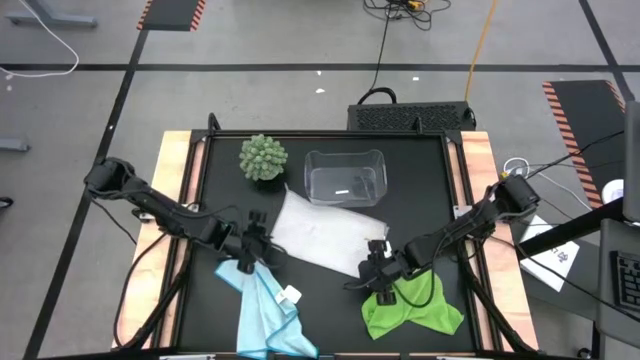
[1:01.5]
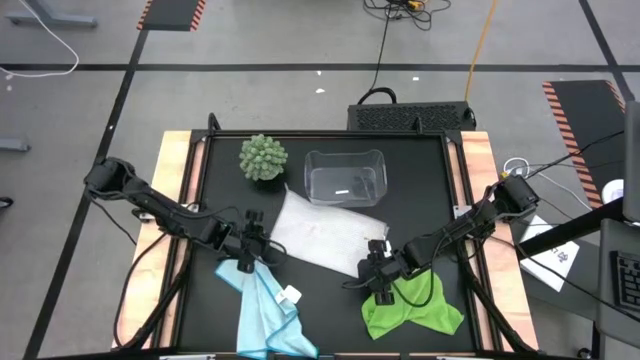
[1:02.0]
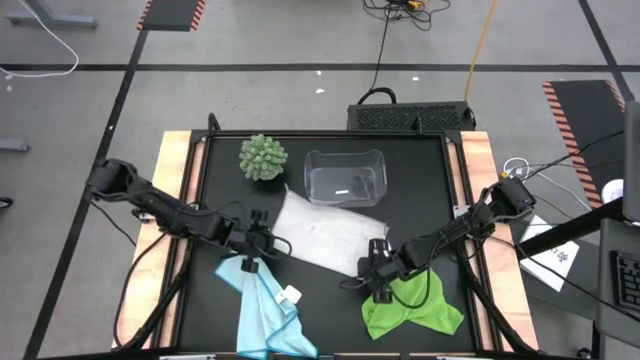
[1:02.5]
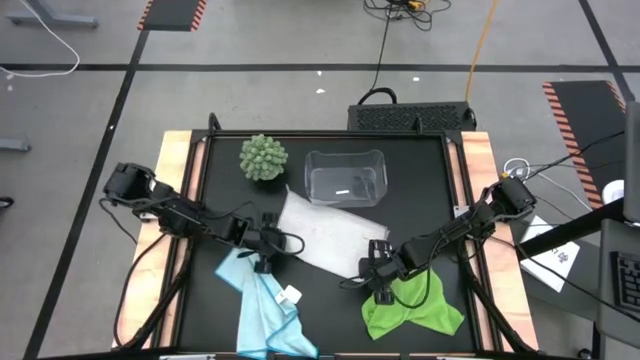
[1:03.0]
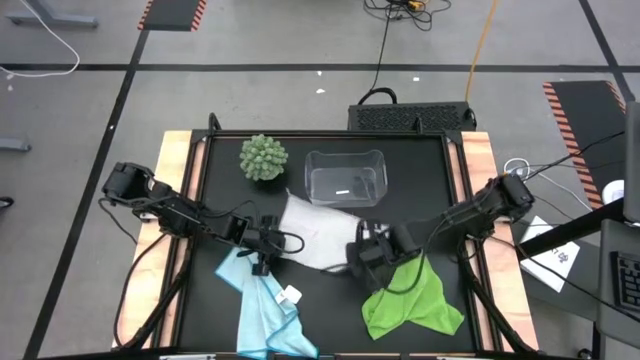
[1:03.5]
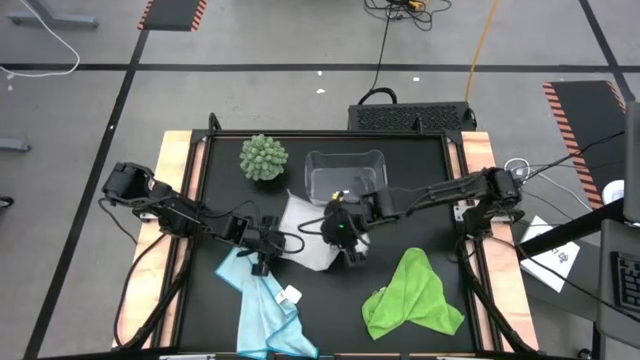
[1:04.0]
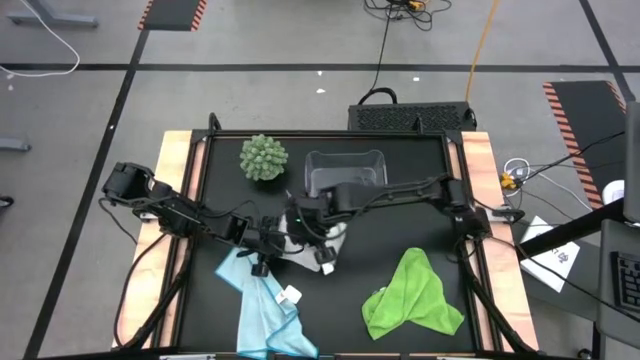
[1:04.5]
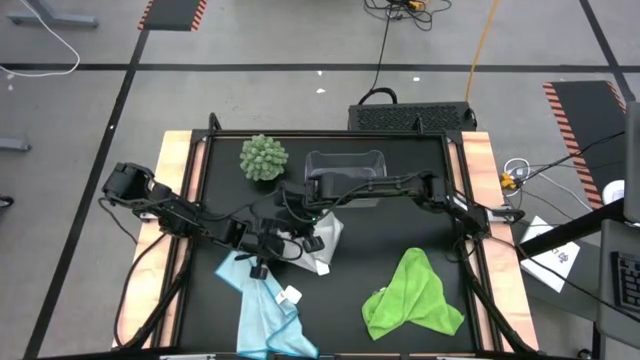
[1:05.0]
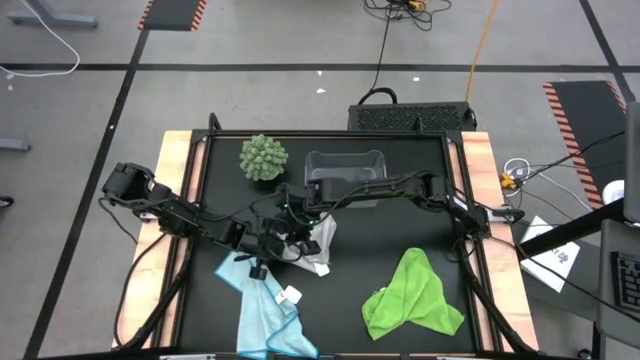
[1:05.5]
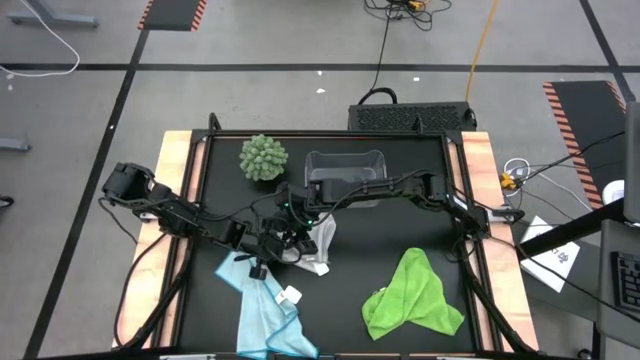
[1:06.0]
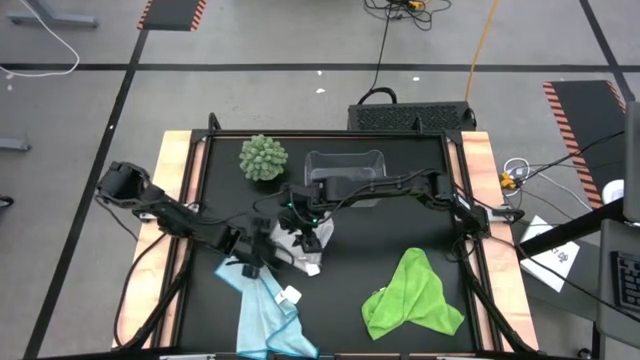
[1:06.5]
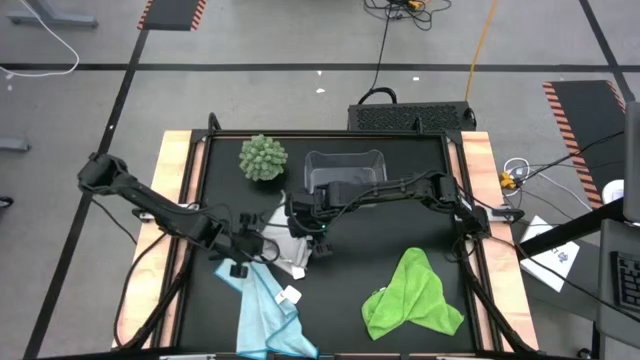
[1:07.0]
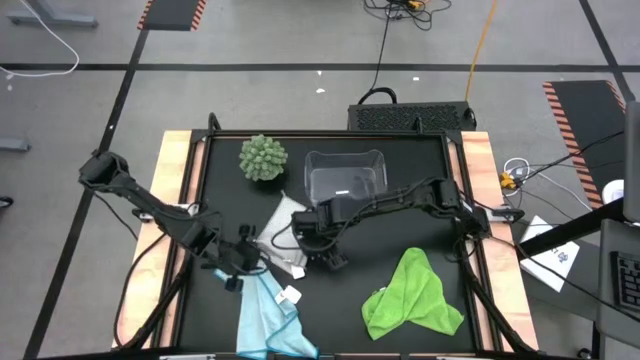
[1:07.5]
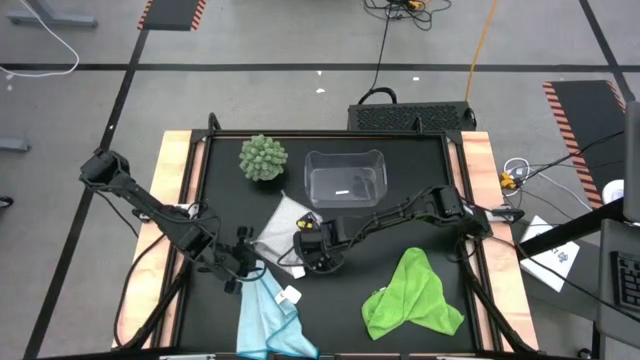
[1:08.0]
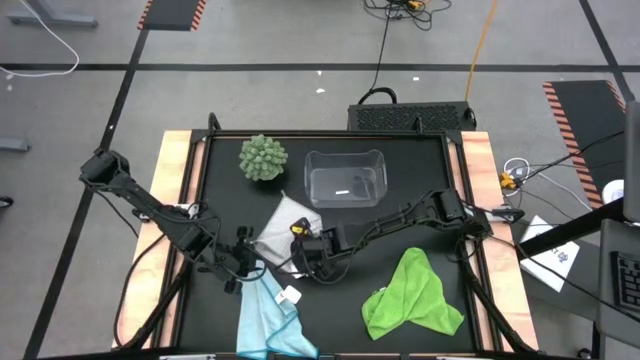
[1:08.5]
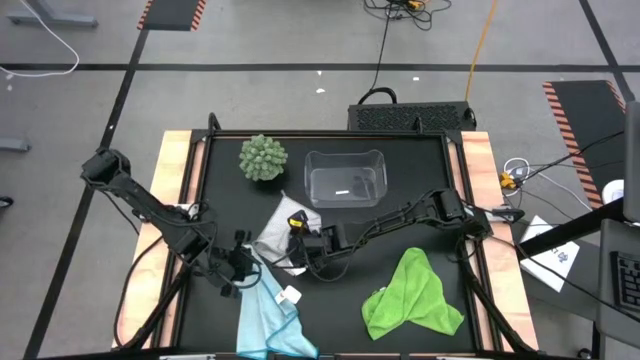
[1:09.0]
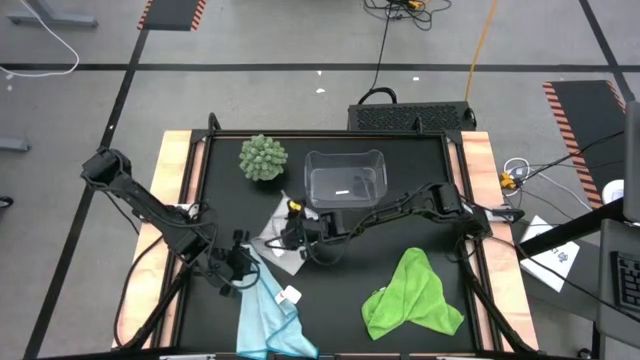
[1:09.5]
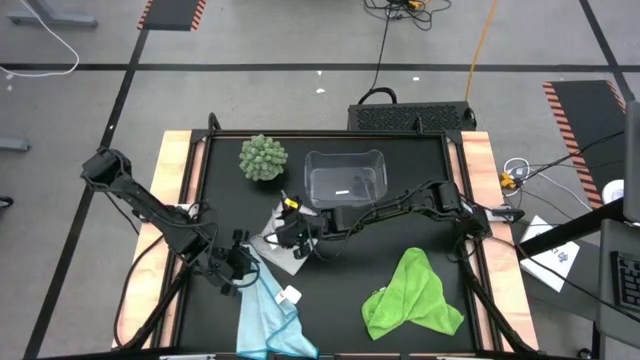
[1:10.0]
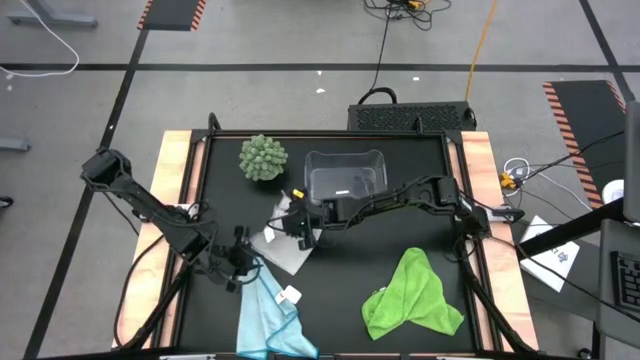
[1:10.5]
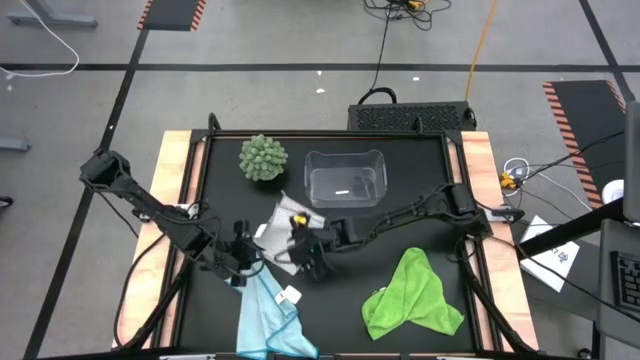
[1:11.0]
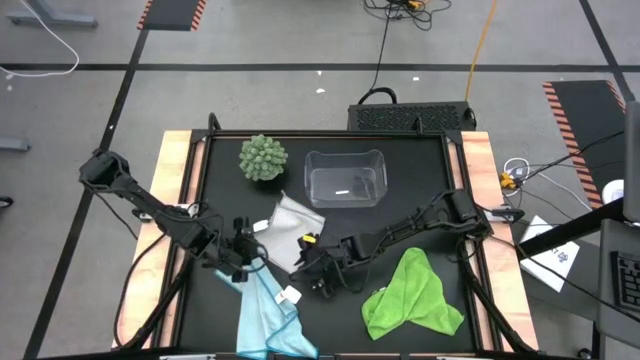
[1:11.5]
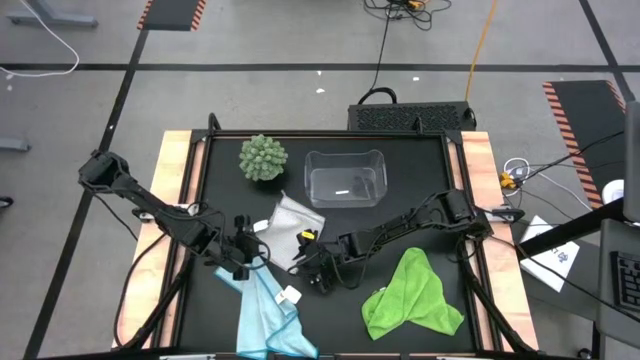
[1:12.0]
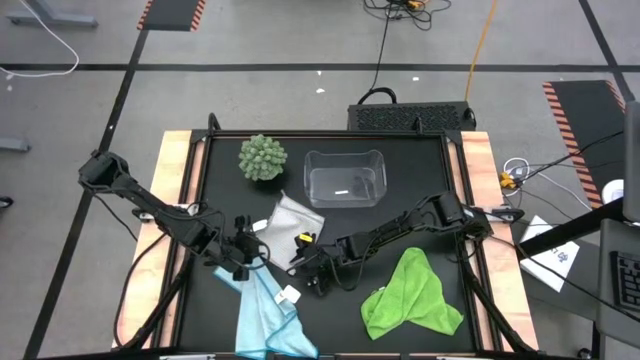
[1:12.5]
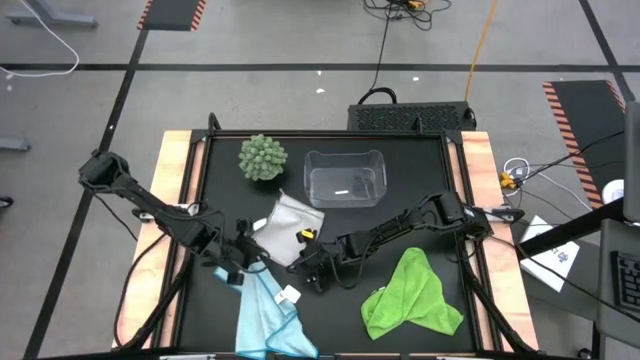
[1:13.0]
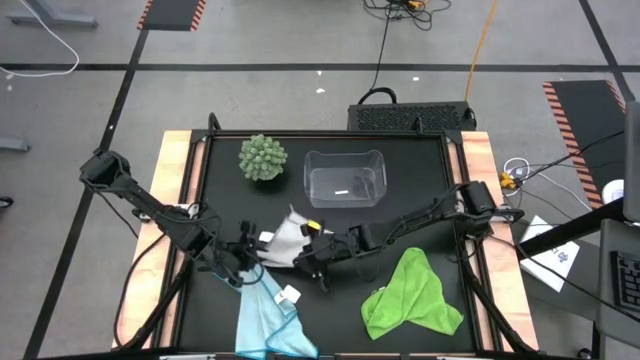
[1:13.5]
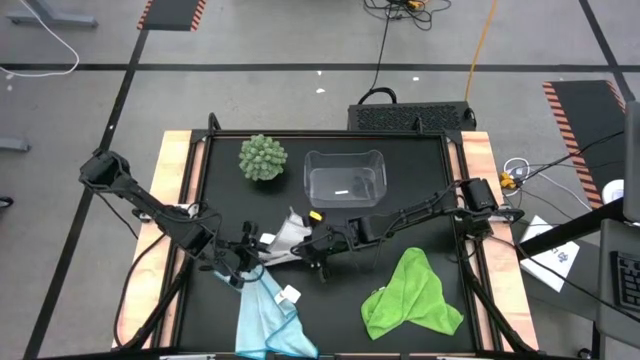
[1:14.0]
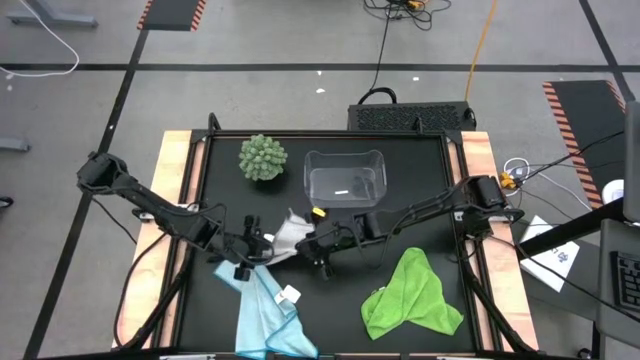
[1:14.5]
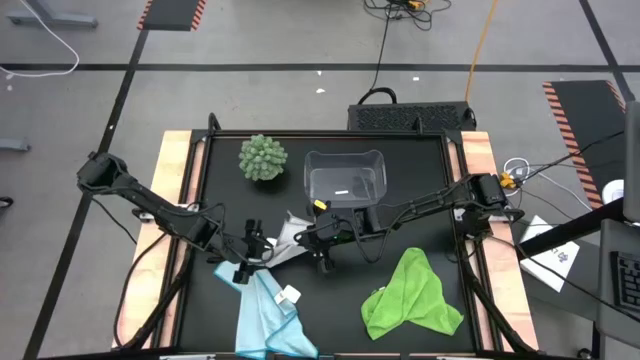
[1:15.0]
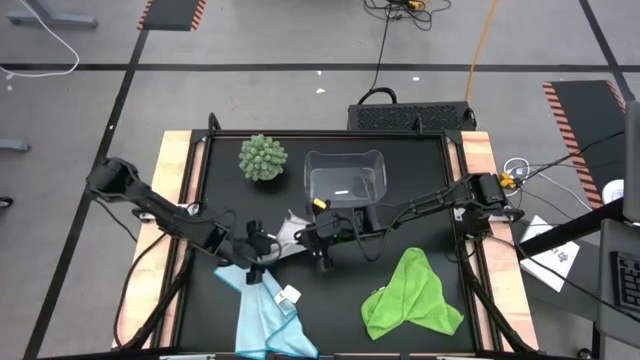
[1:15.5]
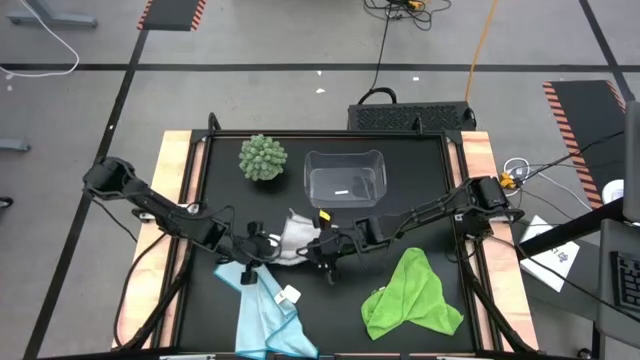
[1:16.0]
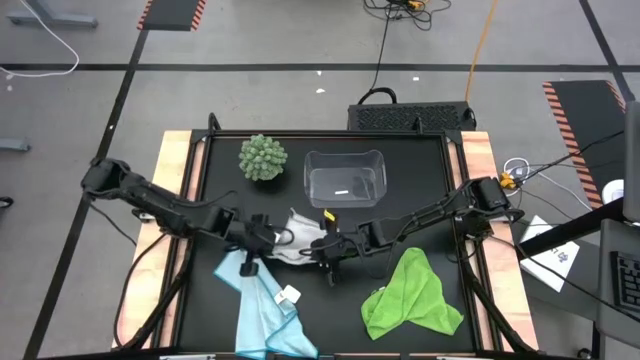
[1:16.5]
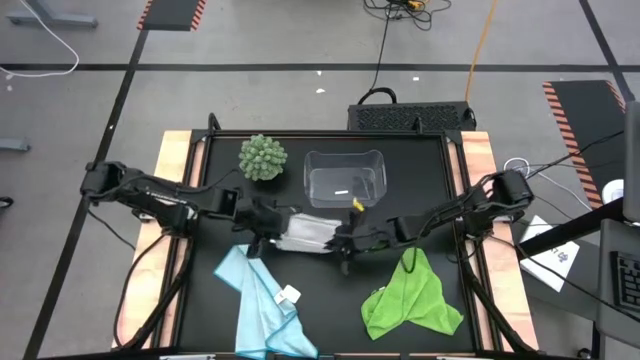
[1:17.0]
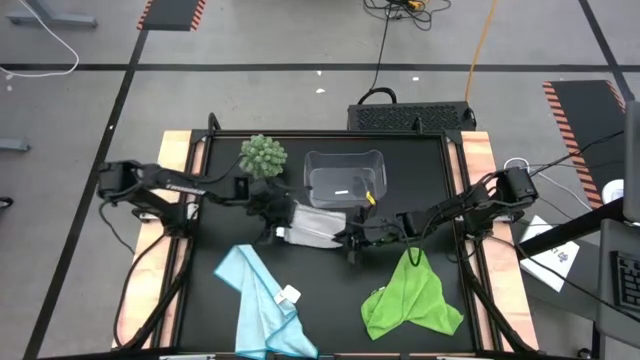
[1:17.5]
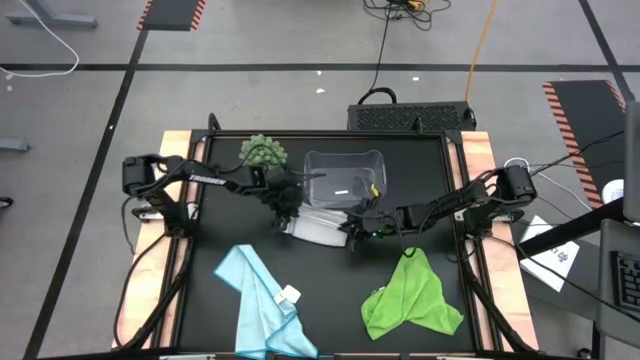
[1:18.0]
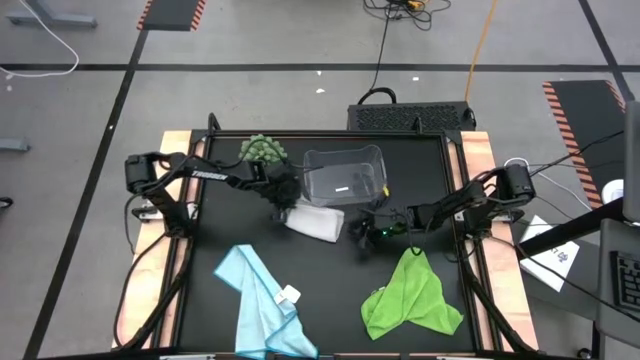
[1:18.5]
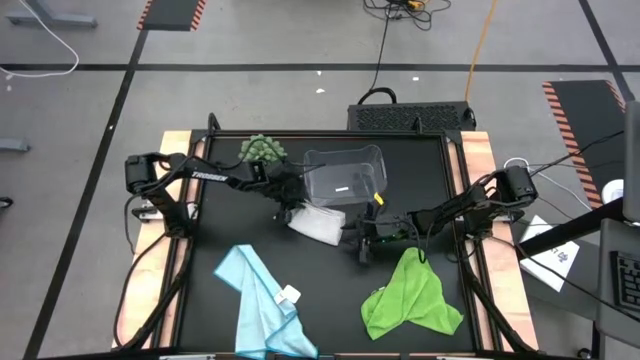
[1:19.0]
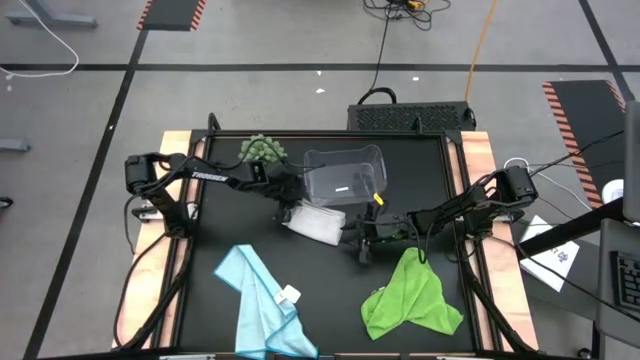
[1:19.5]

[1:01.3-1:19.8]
Task: Fold microfiber towels
Fold the gray towel

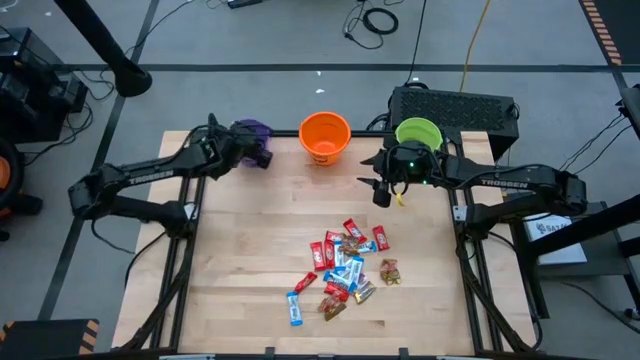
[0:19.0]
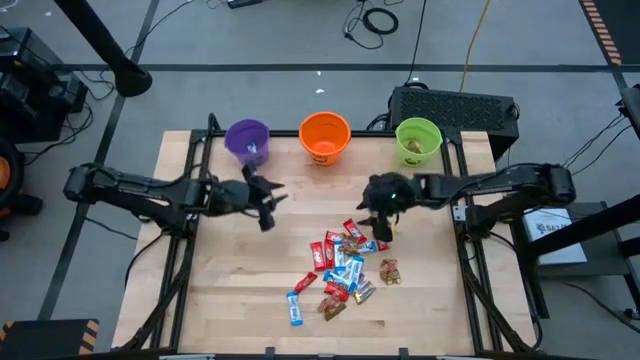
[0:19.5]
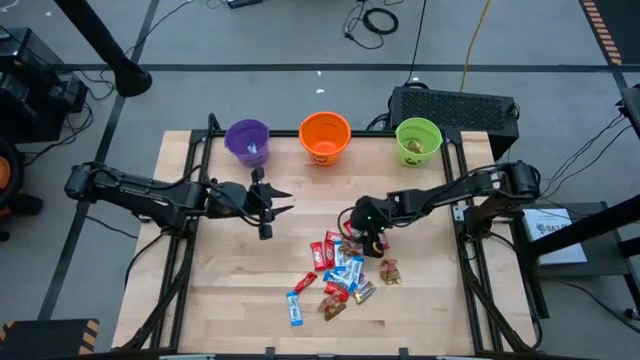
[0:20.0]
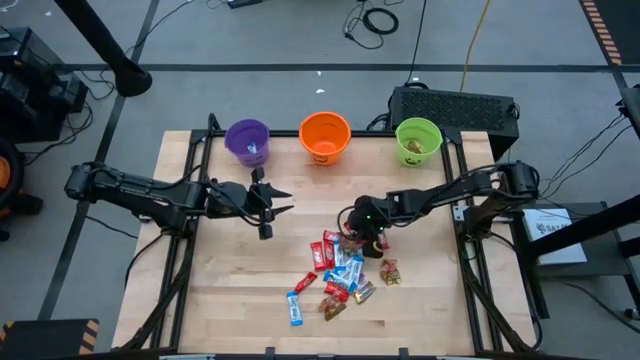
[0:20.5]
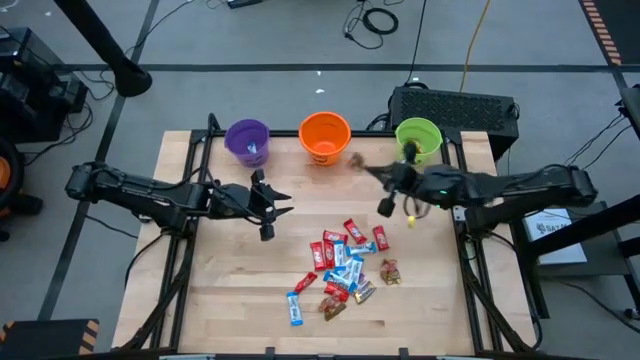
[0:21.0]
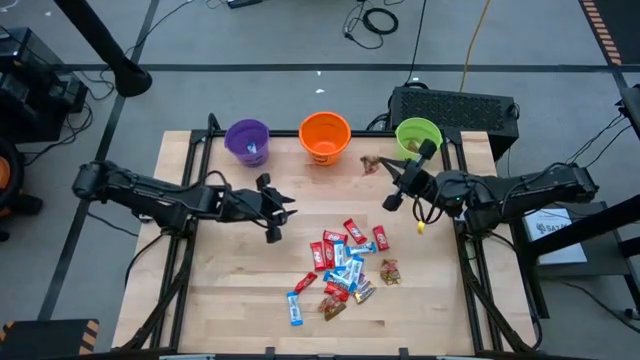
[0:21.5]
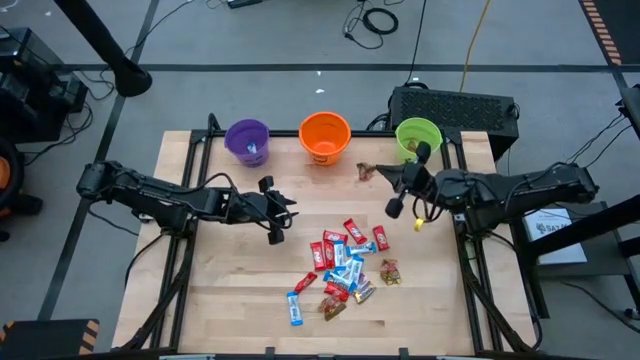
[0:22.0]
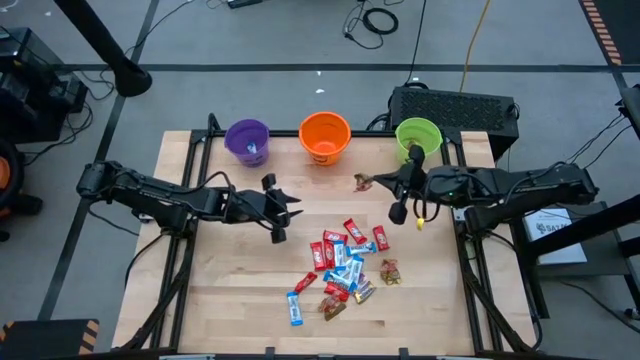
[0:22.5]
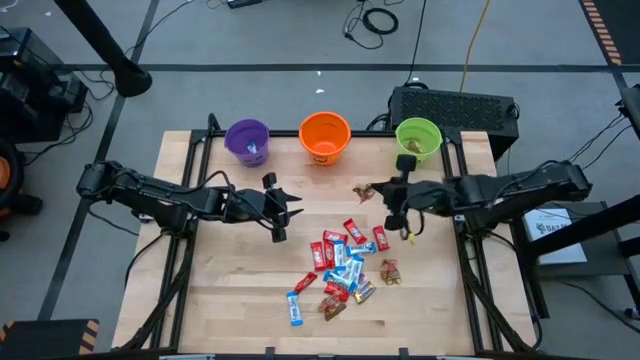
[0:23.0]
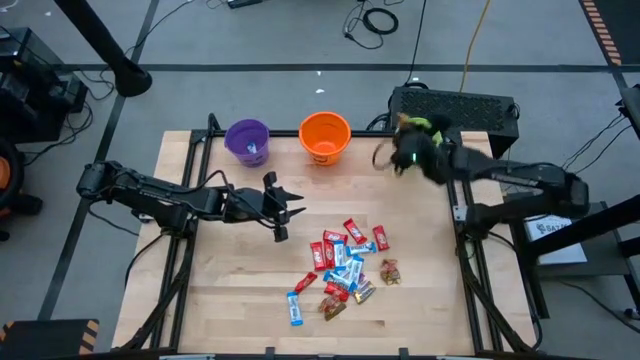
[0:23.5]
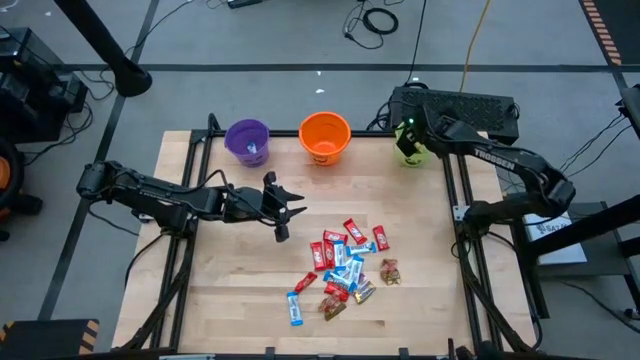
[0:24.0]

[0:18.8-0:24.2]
Task: Sort candy by brand, put in halloween buckets
Put the brown gummy into the green bucket
